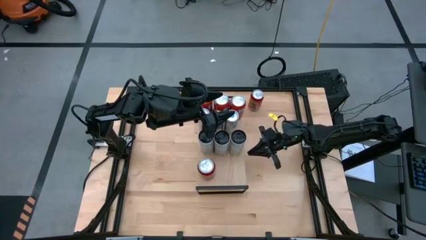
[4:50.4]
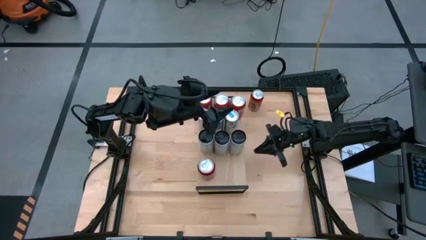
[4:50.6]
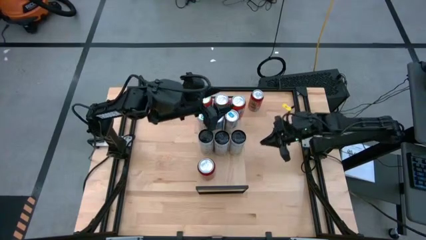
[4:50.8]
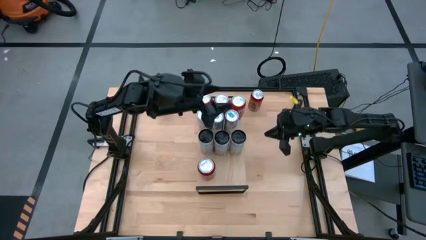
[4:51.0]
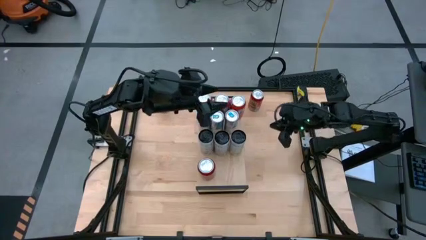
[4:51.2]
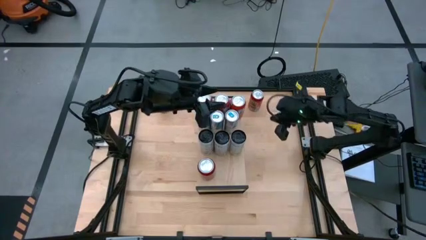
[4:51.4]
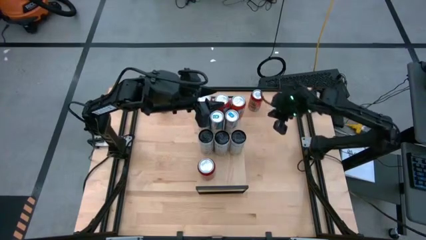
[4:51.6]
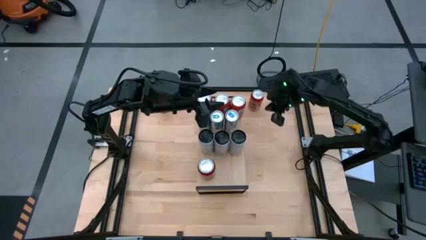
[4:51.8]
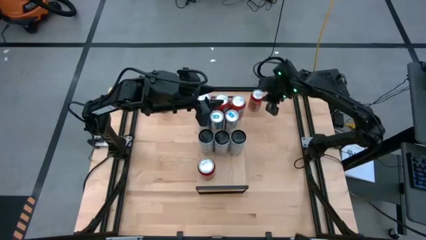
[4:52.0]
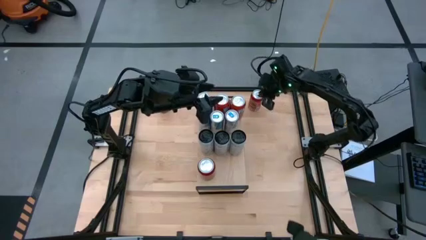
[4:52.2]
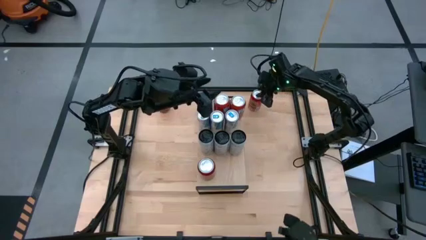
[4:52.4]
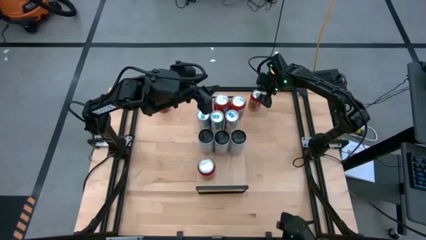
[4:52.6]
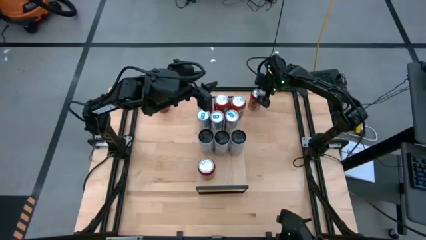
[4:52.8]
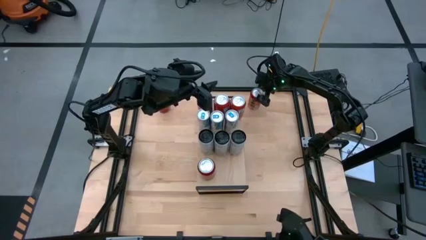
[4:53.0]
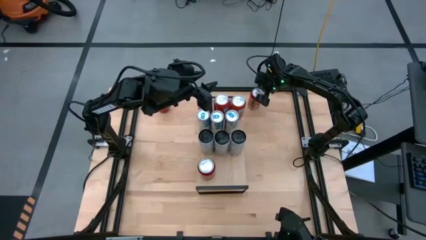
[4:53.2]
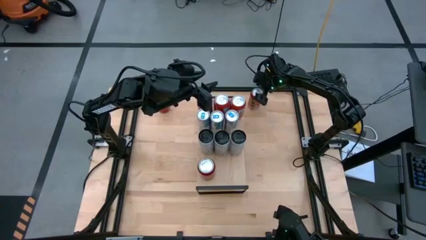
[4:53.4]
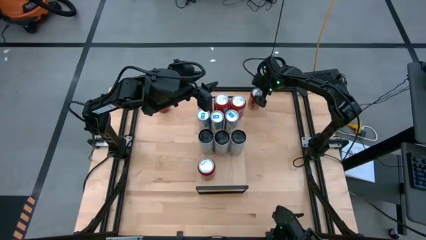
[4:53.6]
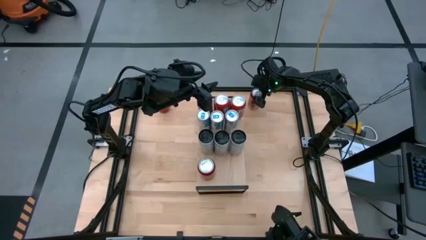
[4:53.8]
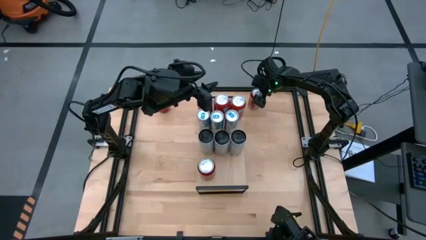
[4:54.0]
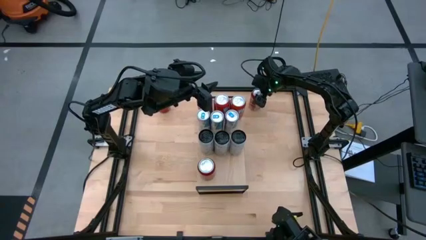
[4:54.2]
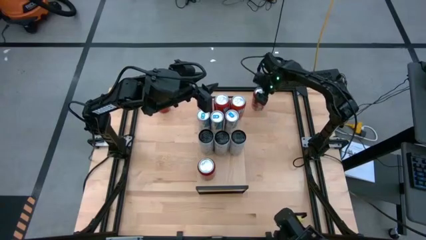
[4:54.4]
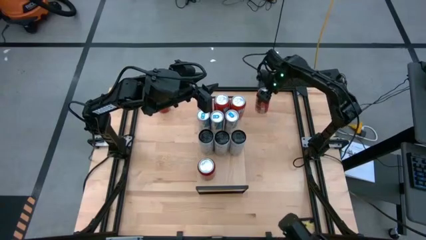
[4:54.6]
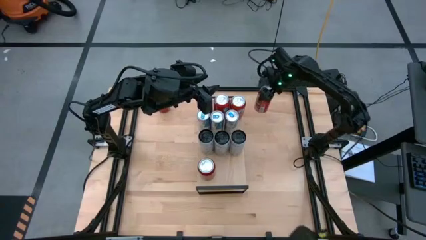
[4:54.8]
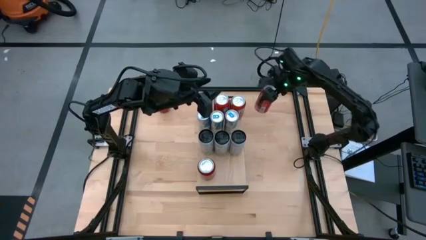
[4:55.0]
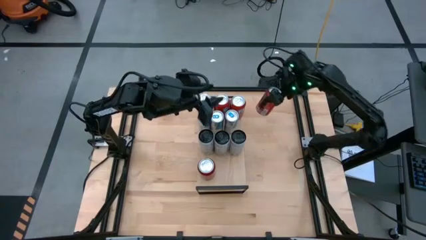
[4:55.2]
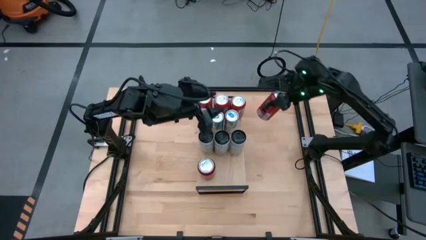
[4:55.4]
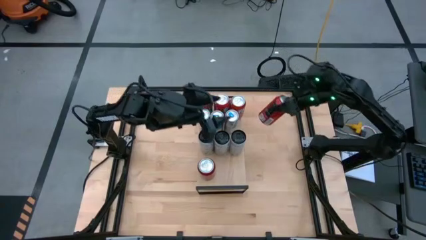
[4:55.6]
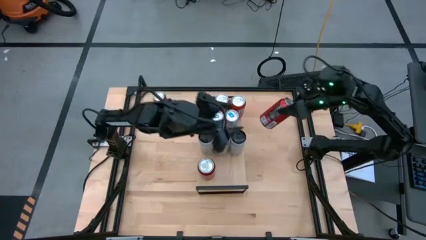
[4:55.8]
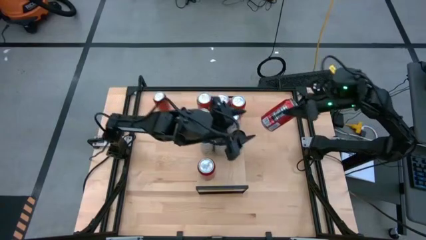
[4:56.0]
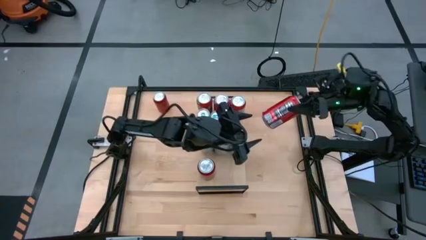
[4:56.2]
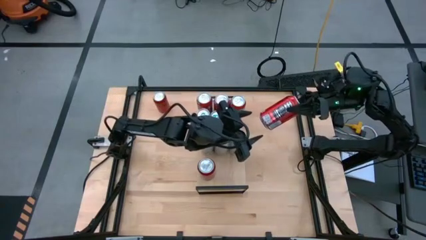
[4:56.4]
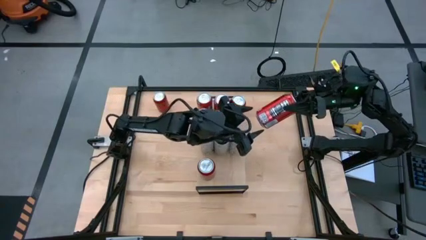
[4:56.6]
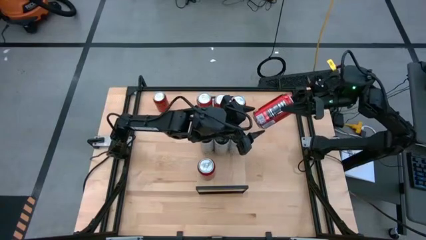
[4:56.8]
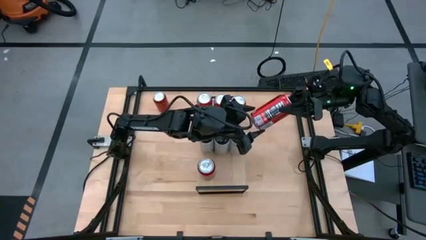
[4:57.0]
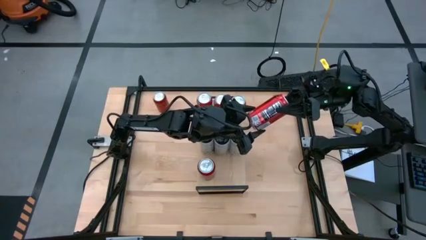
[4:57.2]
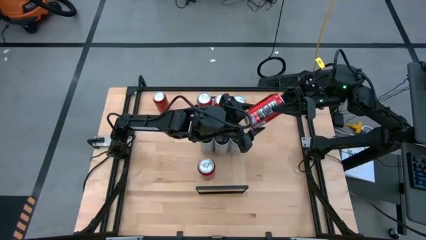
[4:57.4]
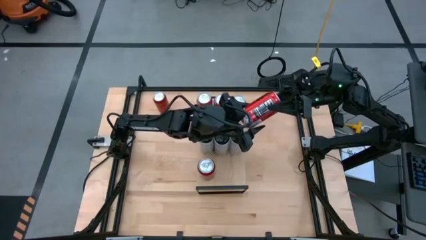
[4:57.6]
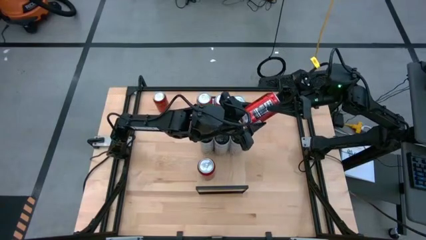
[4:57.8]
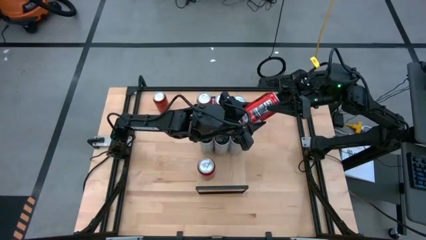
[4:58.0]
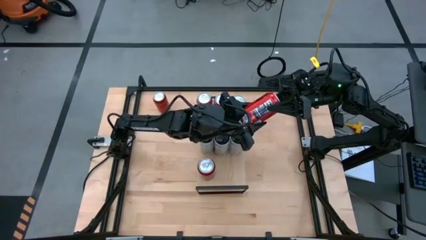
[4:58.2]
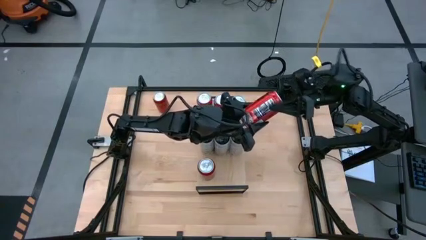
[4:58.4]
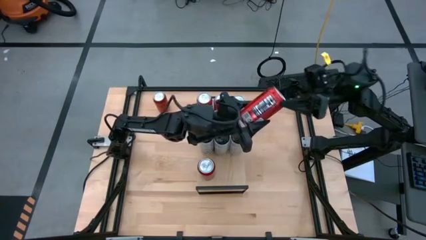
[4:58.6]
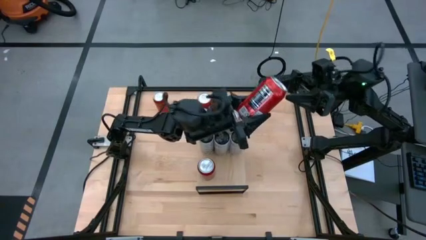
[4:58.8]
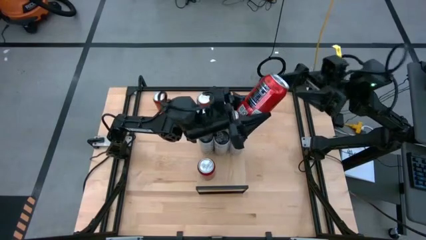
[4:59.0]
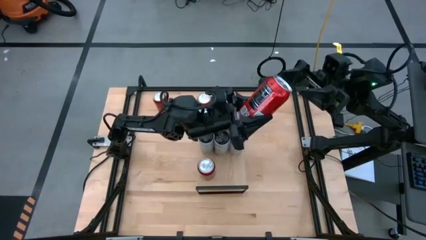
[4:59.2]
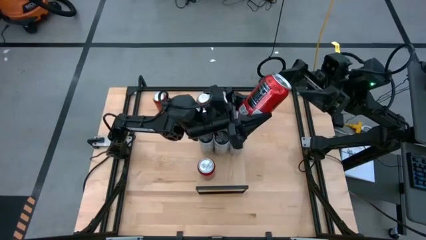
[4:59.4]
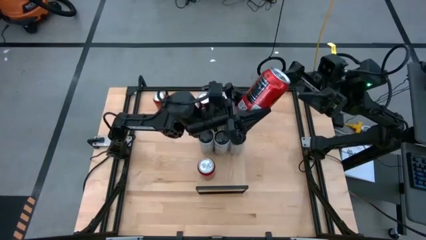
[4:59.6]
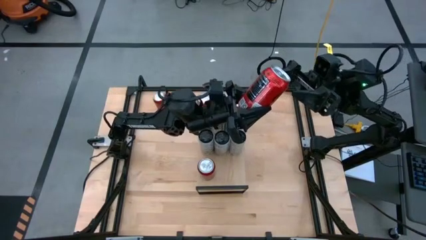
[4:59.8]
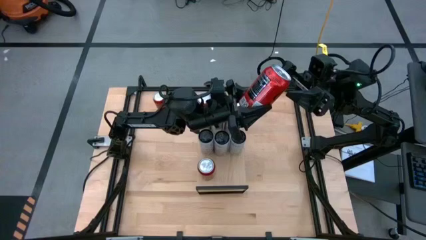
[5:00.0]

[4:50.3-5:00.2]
Task: Place canned beverage on shelf
Put the right red soda can on the shelf aligned with the other red soda can
